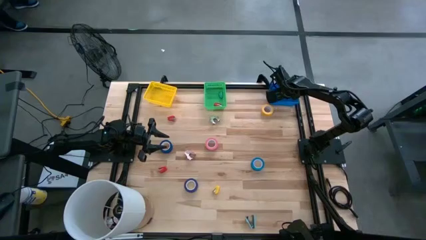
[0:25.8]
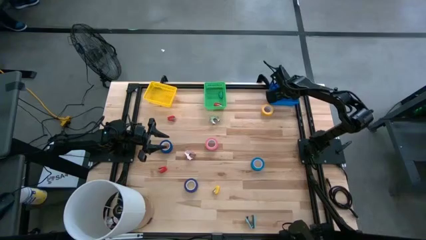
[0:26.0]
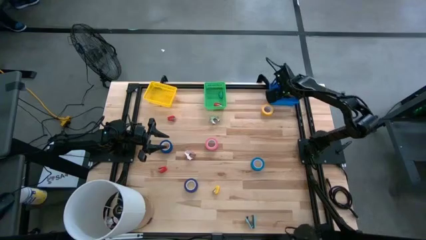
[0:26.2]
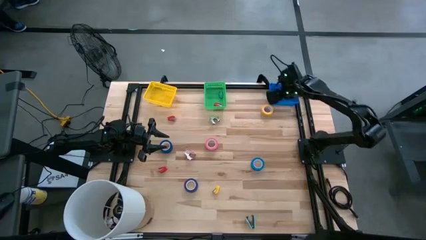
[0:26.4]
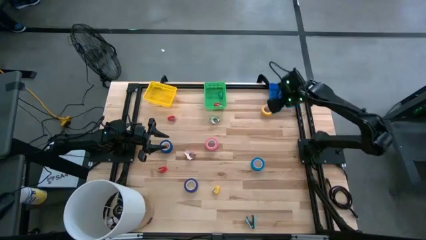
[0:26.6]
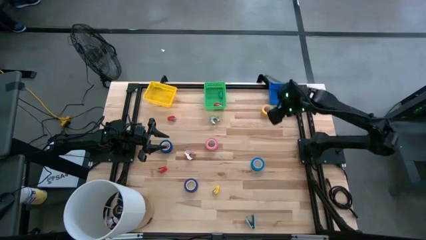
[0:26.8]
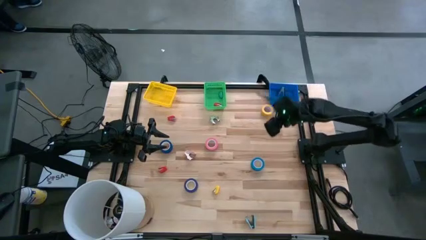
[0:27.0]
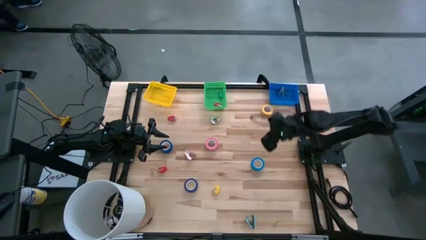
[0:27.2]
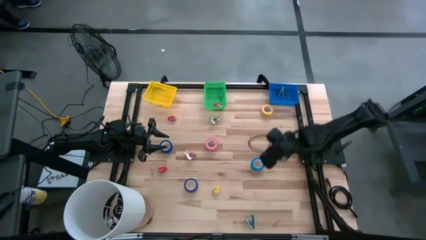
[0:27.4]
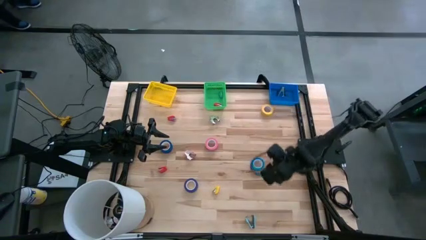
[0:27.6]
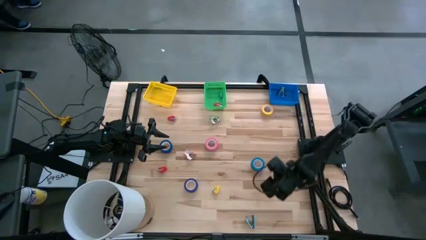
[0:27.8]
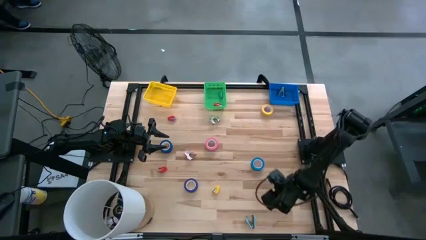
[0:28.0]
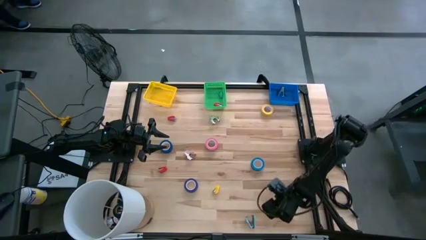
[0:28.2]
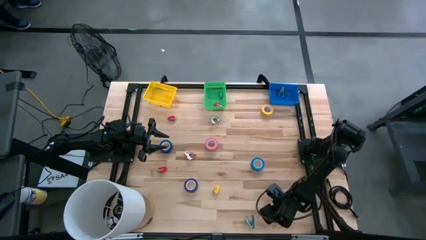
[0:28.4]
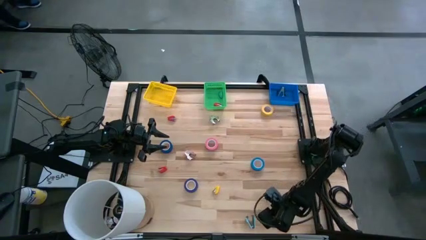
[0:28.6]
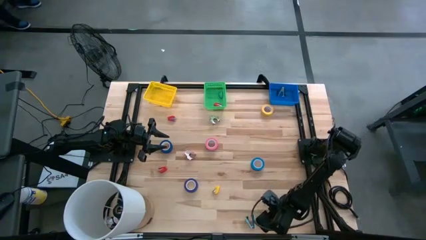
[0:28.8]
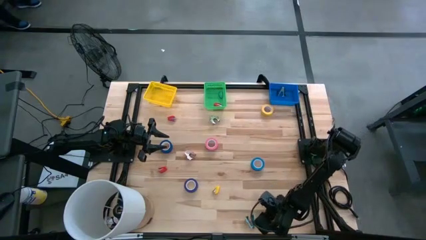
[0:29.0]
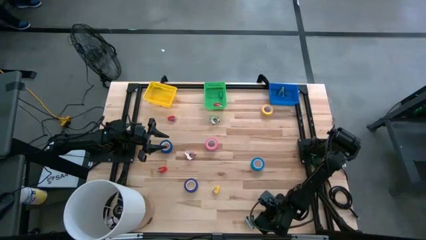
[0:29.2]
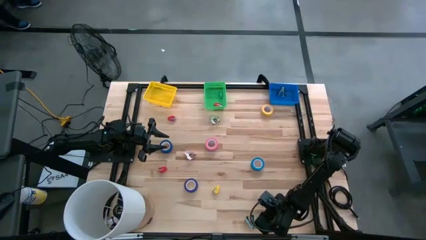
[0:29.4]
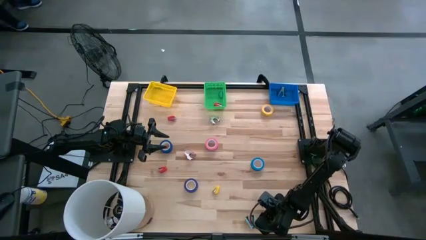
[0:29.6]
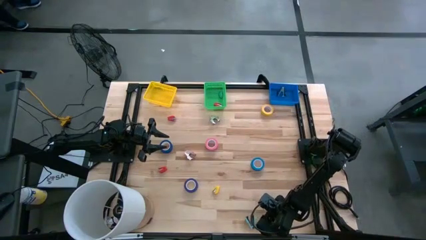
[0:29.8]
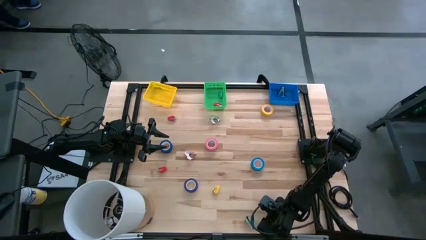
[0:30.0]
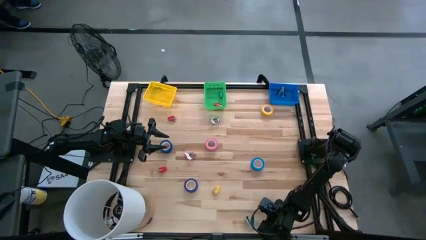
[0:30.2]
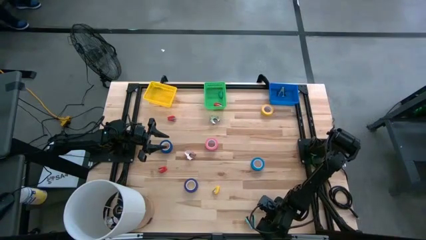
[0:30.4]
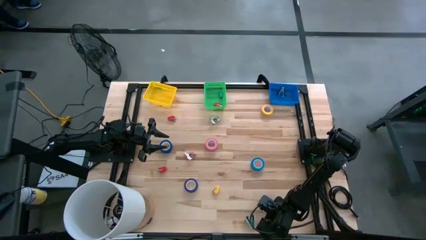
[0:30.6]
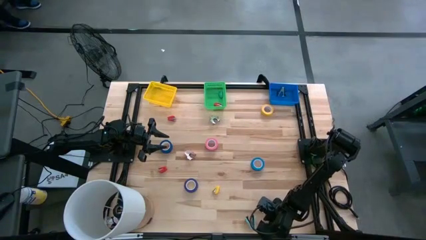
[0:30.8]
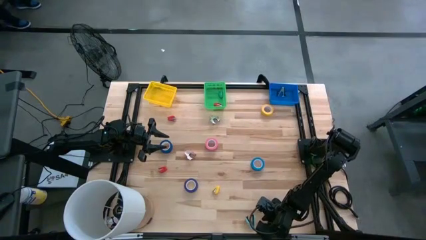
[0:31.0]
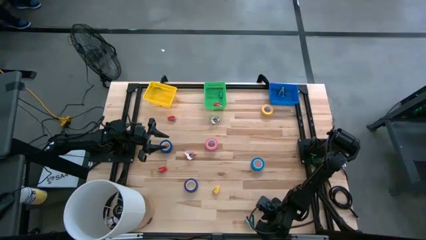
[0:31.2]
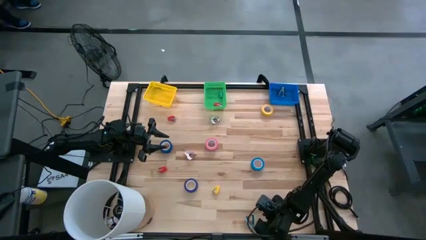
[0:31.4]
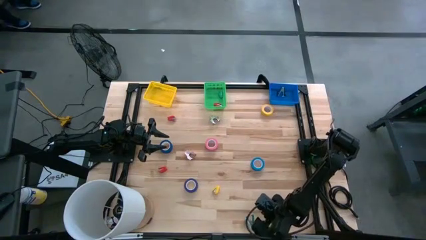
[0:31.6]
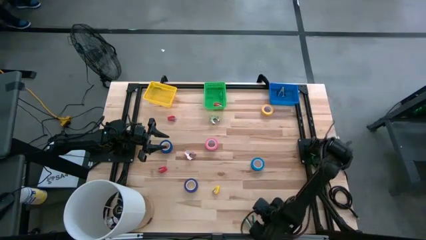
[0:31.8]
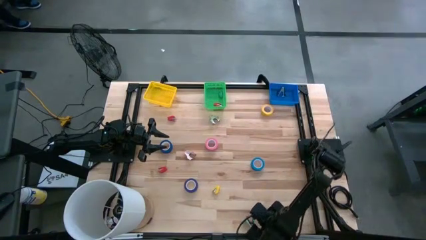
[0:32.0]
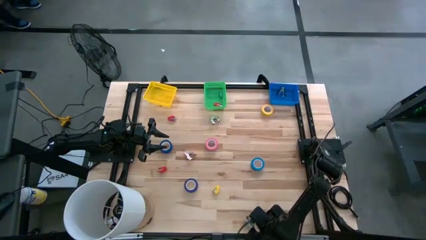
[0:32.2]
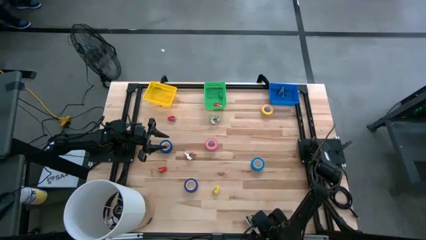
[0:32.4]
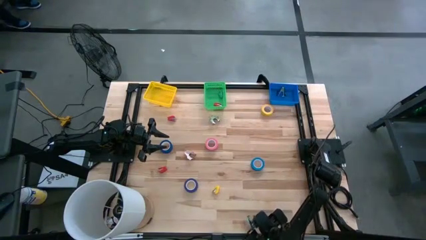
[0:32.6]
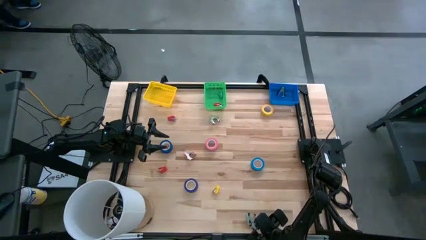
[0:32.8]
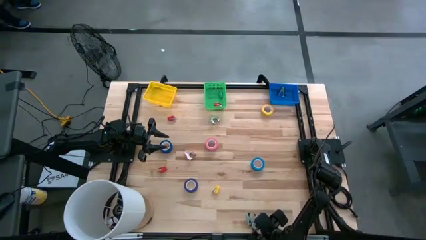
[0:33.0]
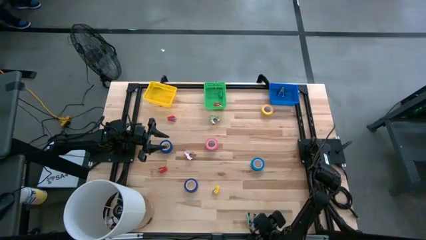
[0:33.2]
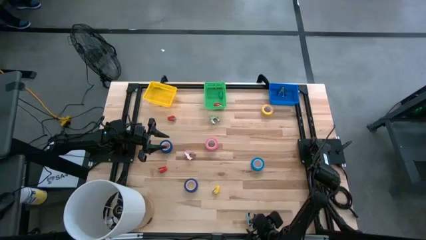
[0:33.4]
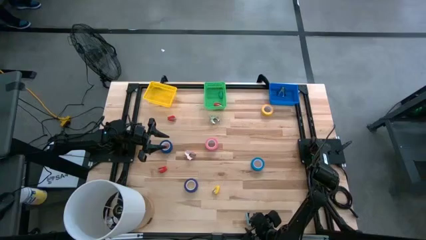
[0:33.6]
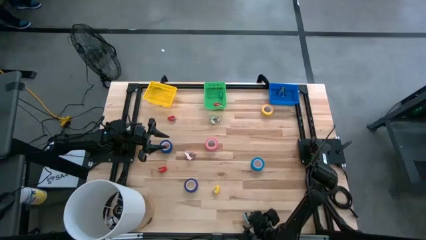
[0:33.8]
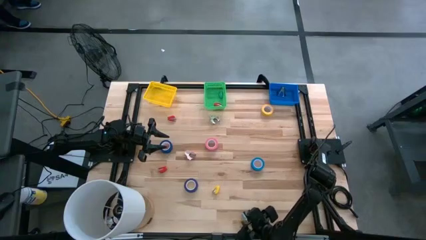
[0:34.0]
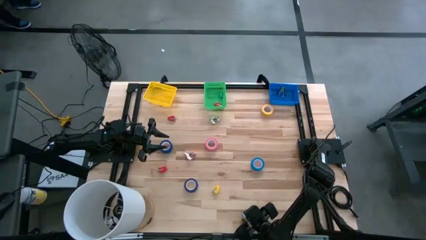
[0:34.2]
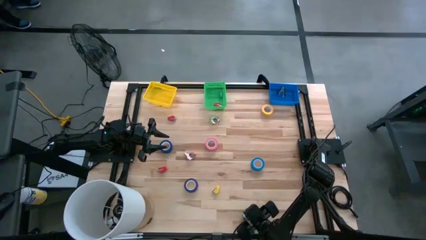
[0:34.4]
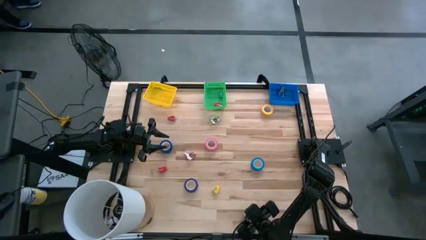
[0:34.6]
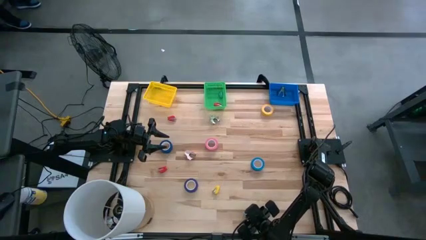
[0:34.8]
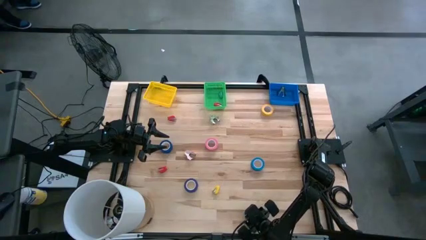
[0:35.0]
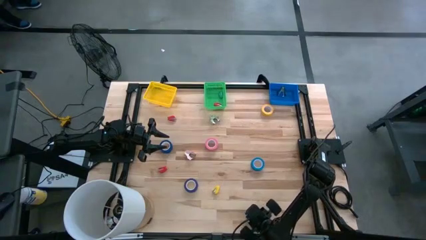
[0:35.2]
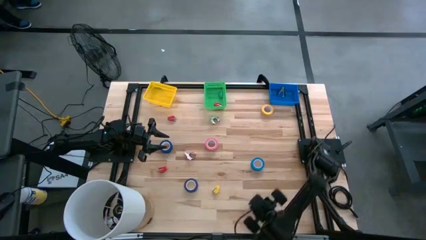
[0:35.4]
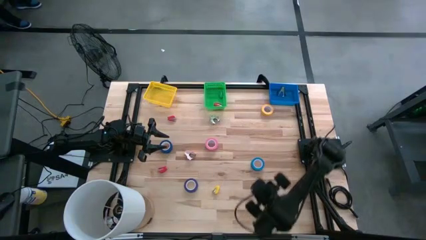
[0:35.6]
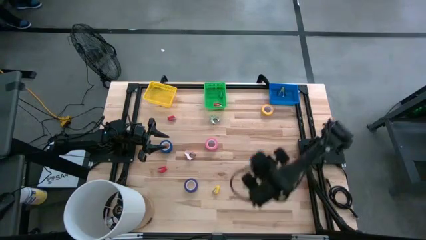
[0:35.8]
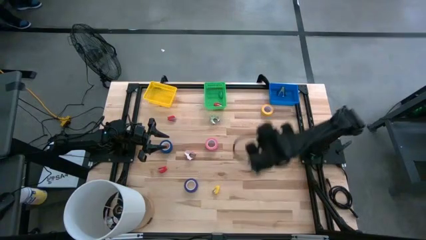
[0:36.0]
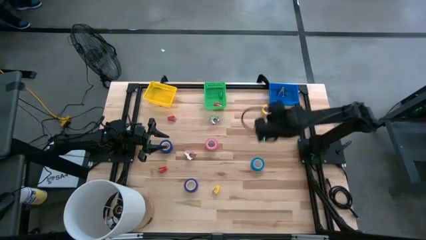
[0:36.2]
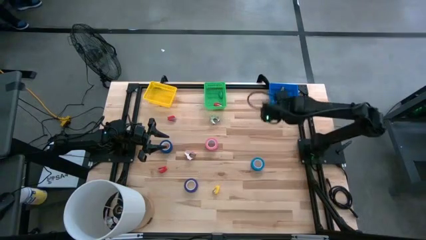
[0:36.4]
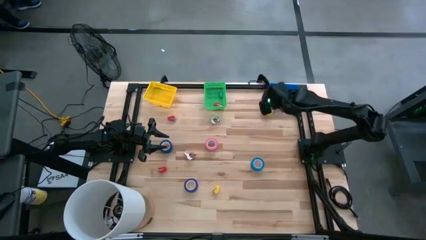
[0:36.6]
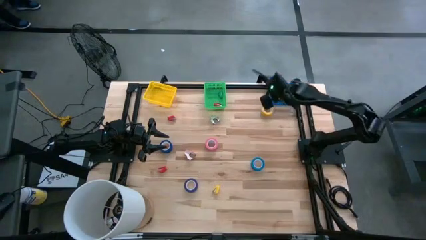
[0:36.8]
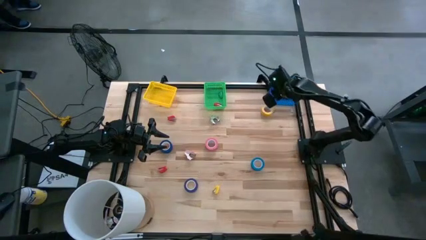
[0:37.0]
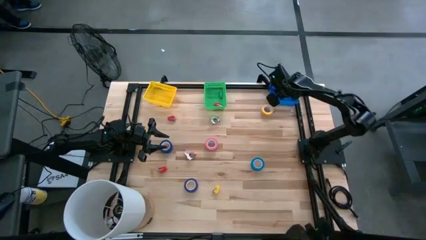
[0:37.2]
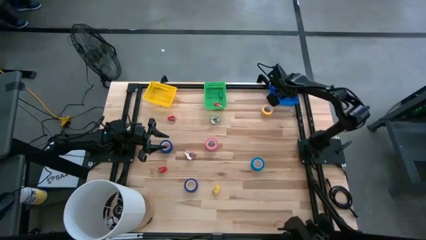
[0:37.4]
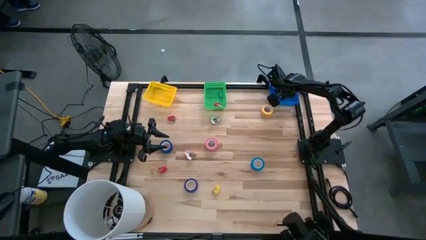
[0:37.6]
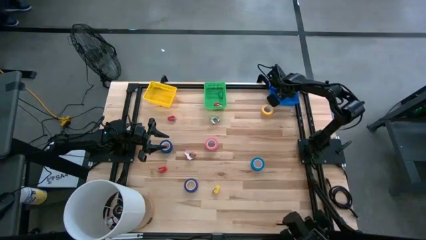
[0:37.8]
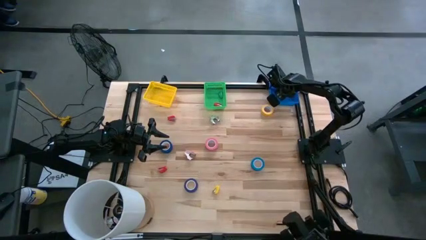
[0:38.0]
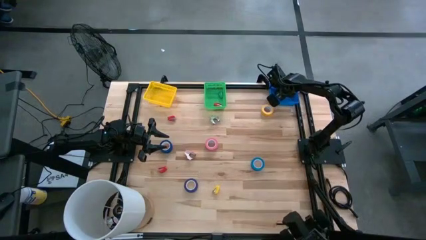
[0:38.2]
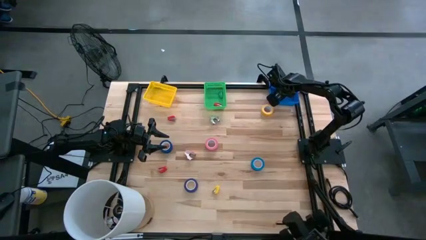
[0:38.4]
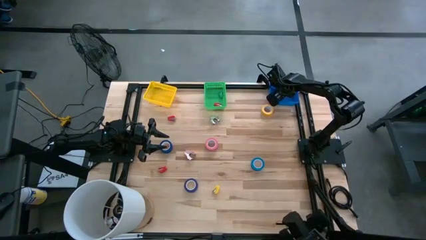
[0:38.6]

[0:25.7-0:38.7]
Task: Pick and place Stapler, Stapler remover, tape
Put the light blue staple remover into the blue basket
